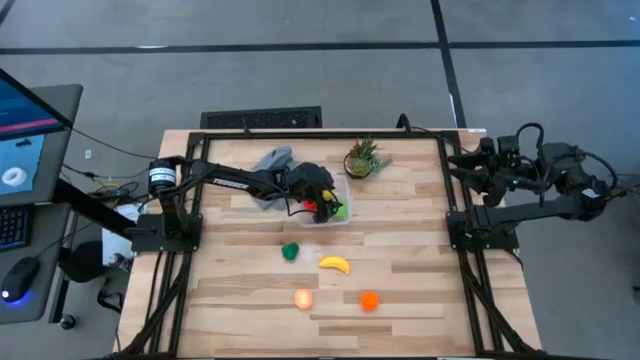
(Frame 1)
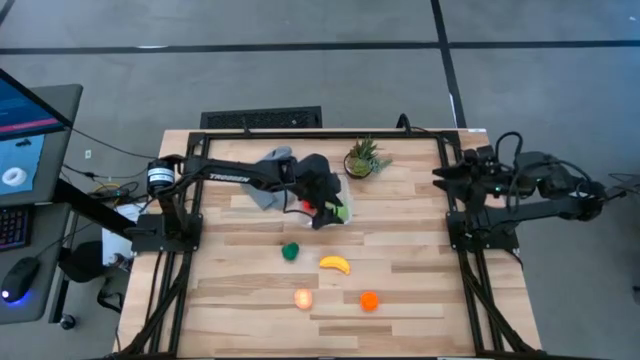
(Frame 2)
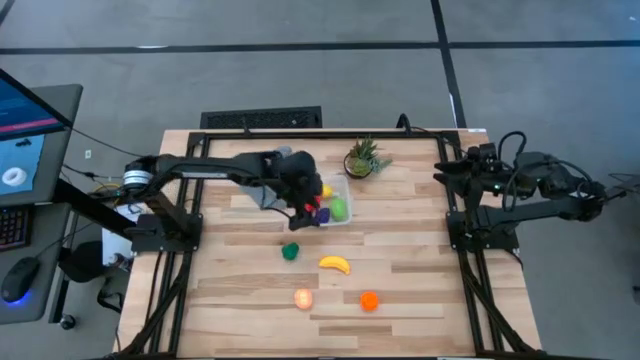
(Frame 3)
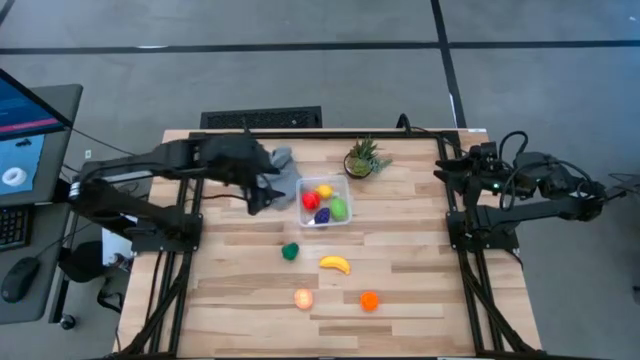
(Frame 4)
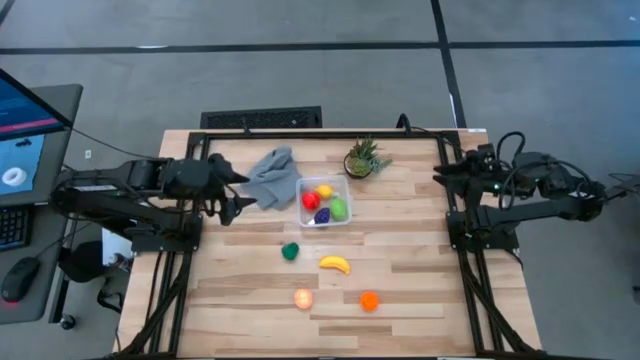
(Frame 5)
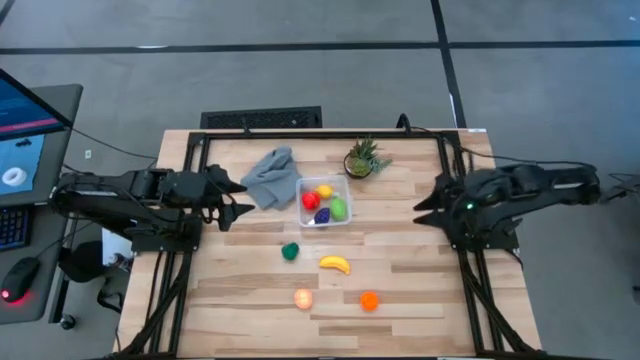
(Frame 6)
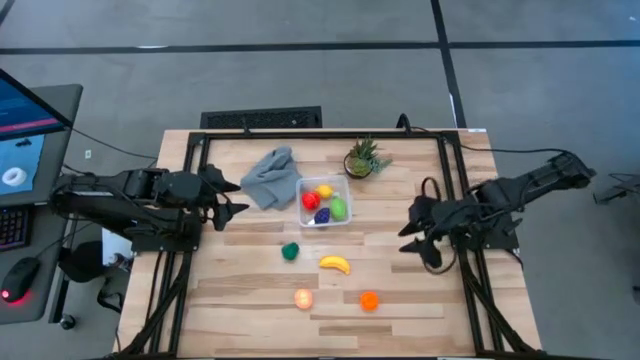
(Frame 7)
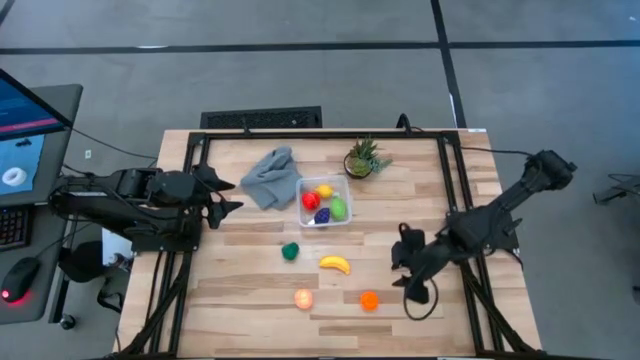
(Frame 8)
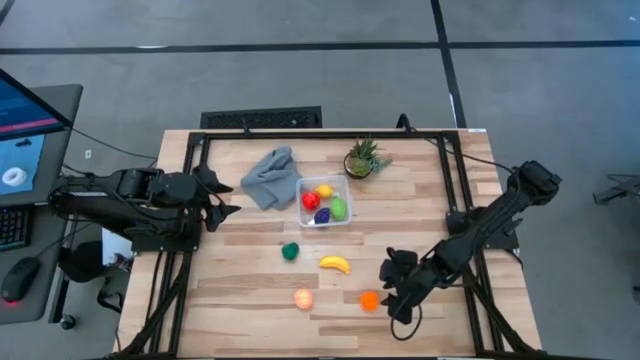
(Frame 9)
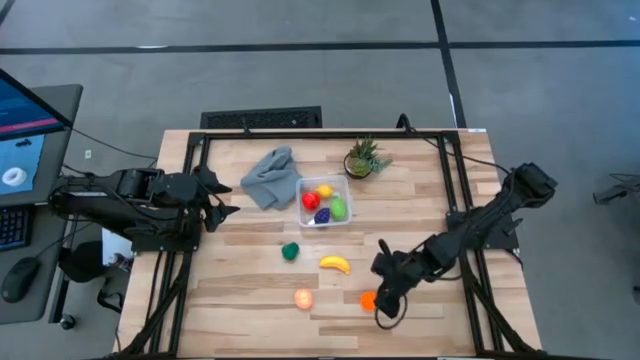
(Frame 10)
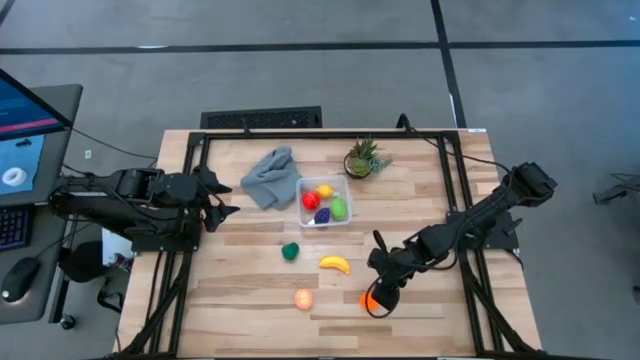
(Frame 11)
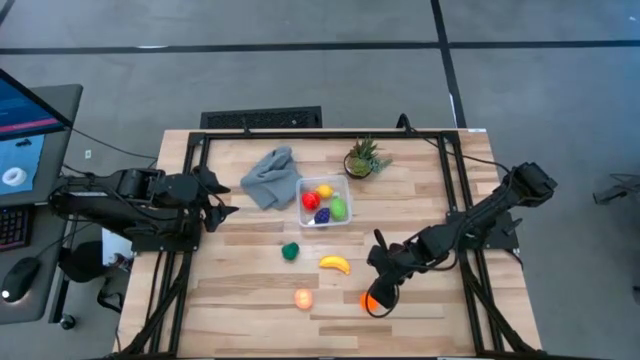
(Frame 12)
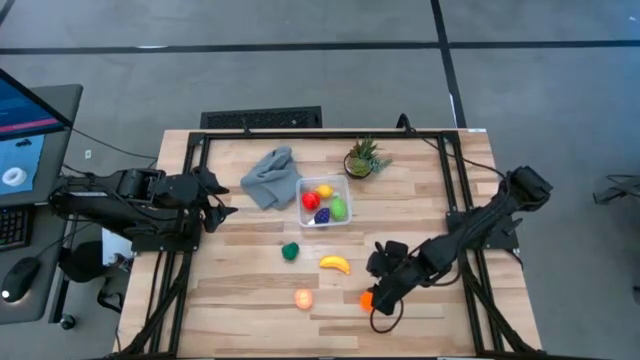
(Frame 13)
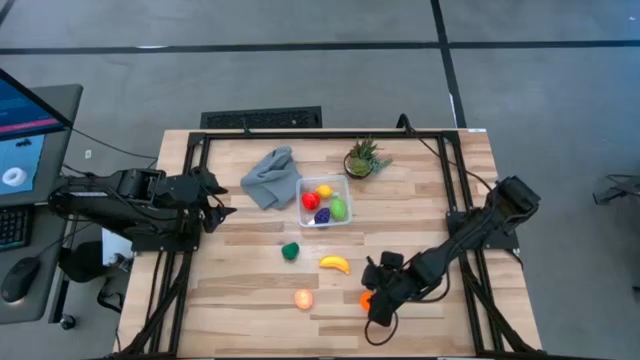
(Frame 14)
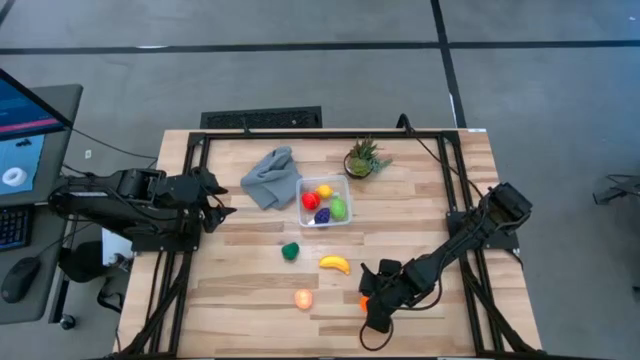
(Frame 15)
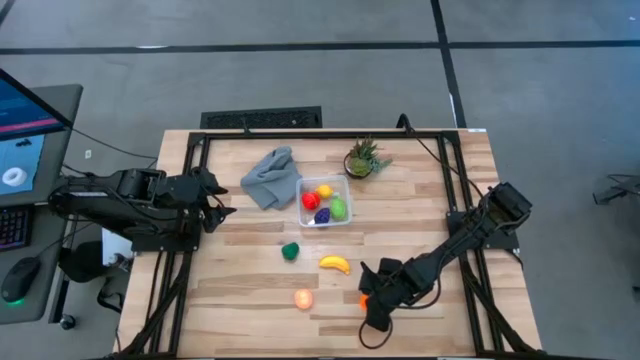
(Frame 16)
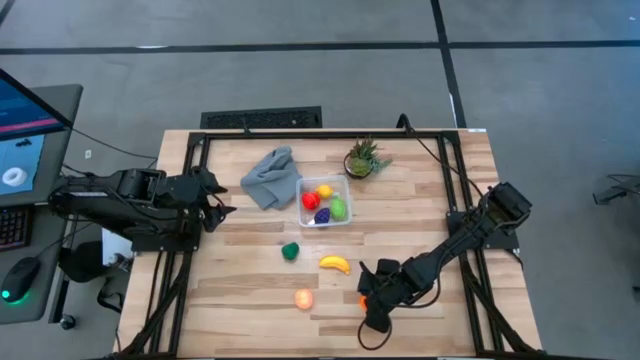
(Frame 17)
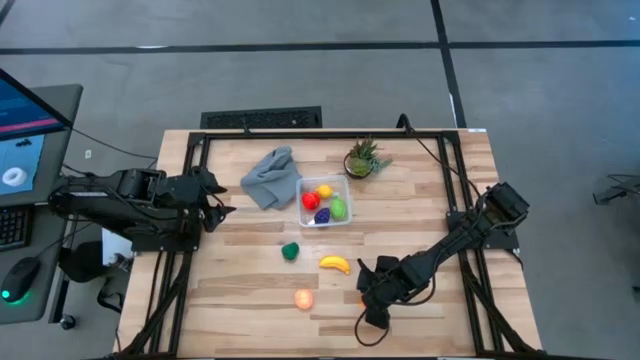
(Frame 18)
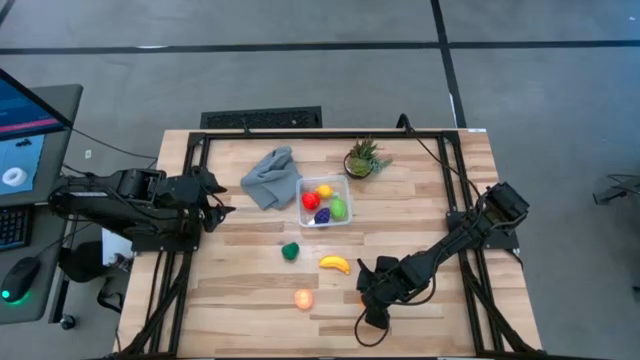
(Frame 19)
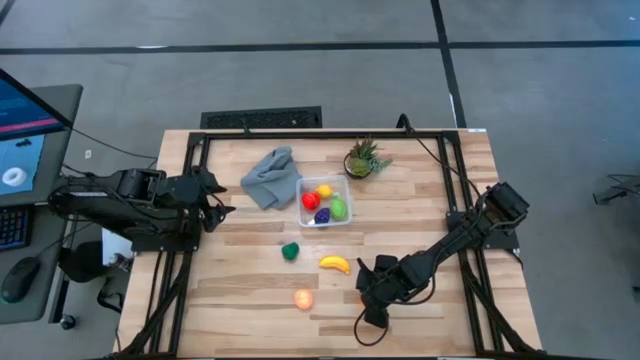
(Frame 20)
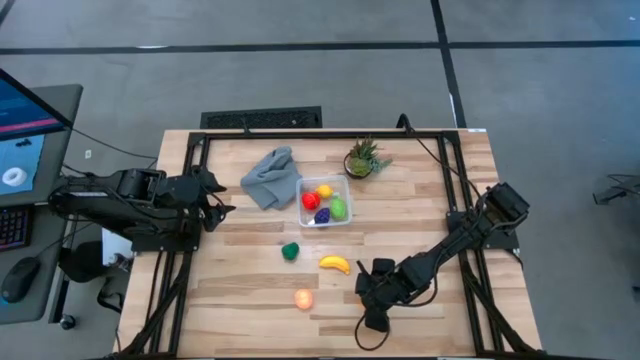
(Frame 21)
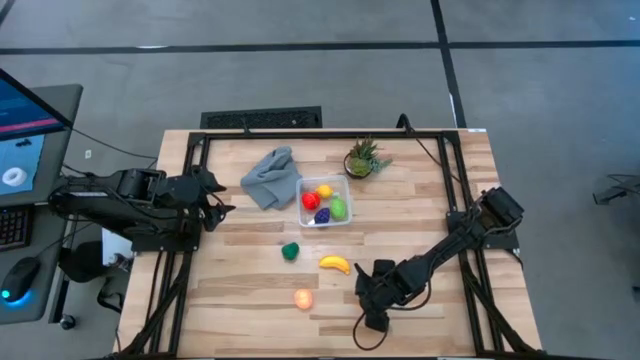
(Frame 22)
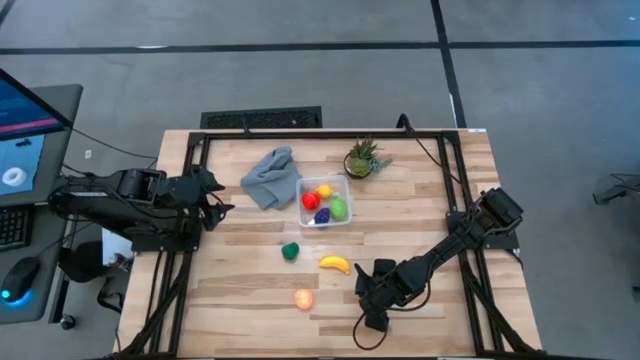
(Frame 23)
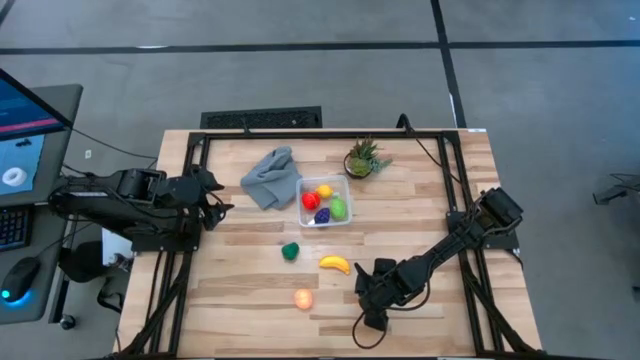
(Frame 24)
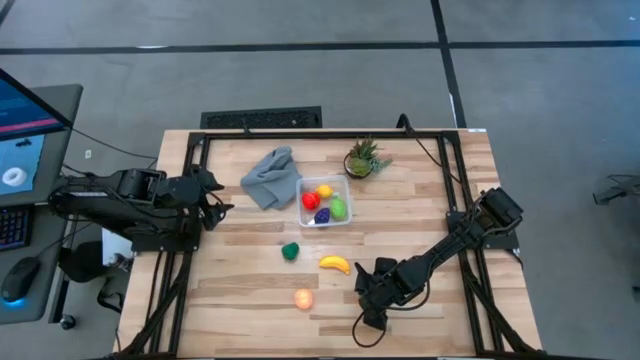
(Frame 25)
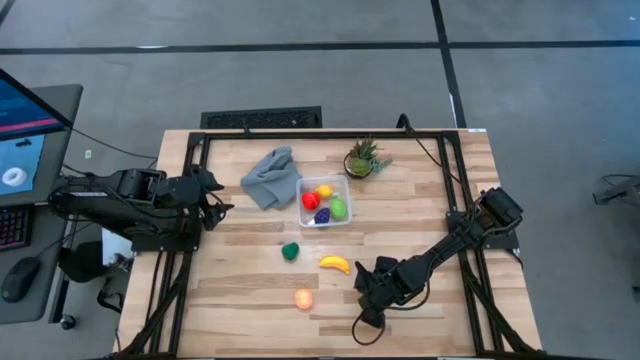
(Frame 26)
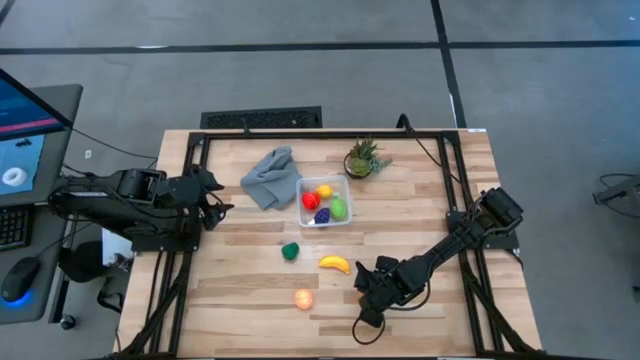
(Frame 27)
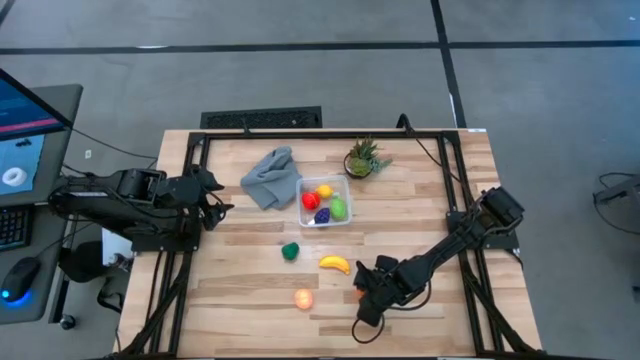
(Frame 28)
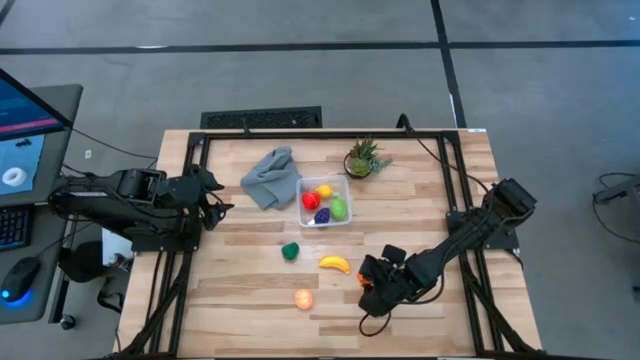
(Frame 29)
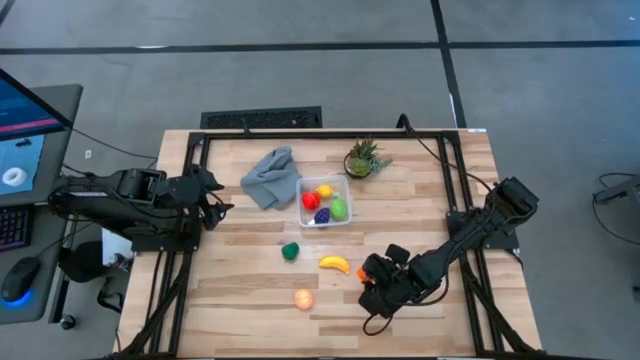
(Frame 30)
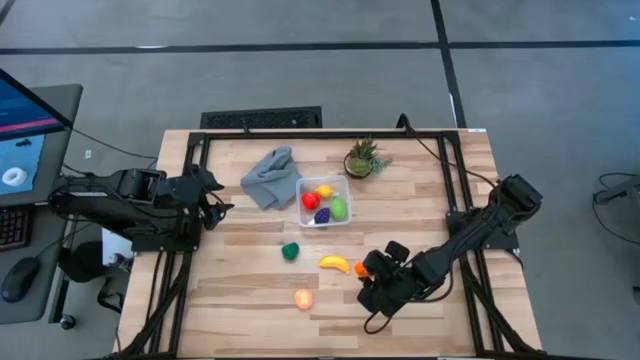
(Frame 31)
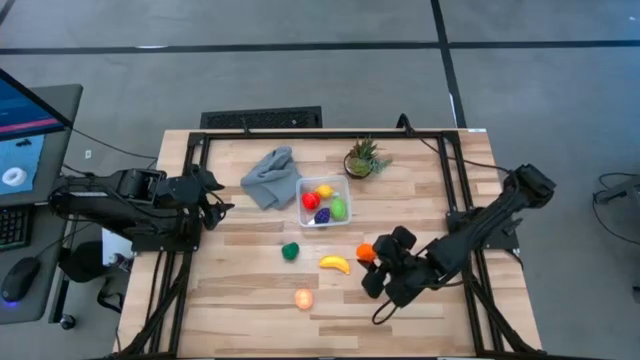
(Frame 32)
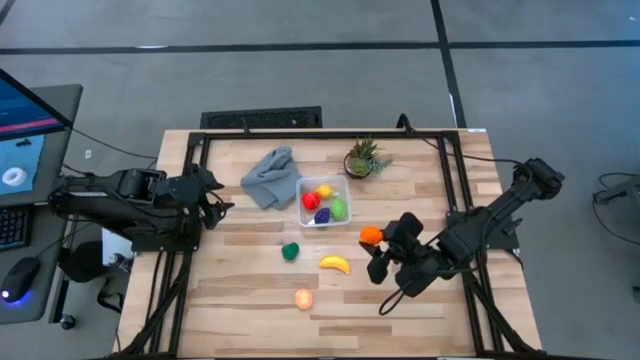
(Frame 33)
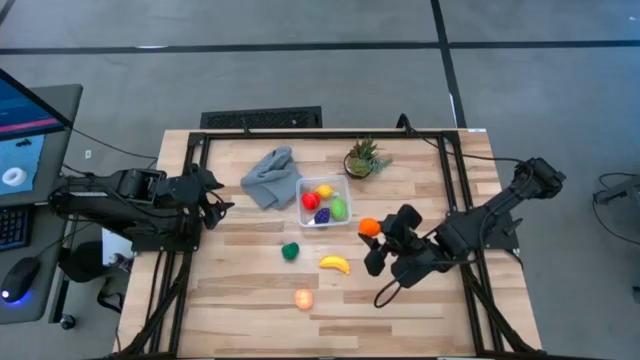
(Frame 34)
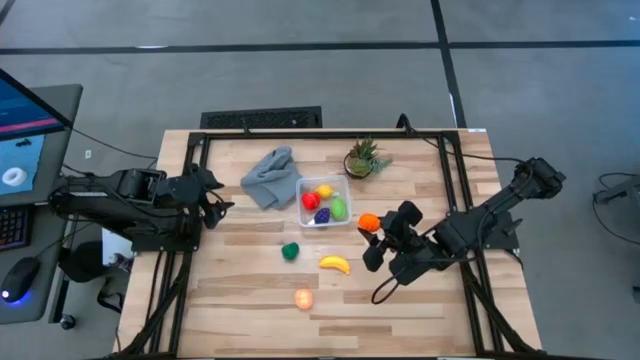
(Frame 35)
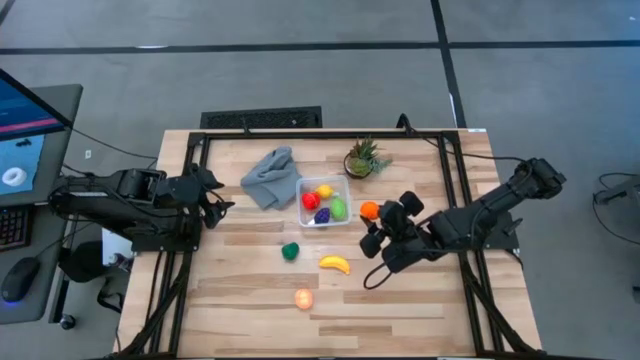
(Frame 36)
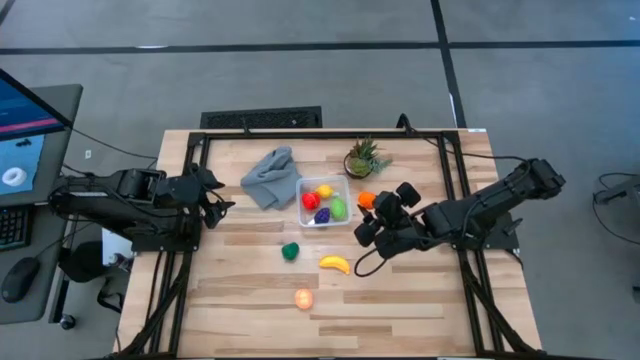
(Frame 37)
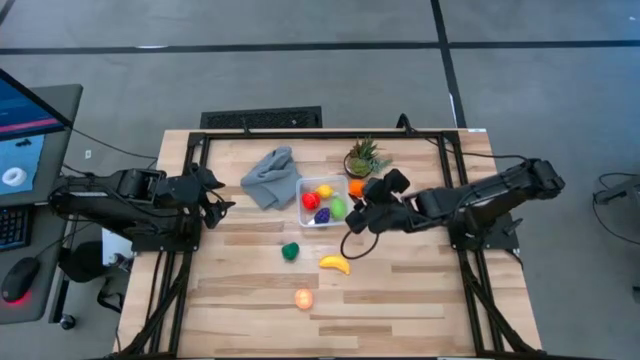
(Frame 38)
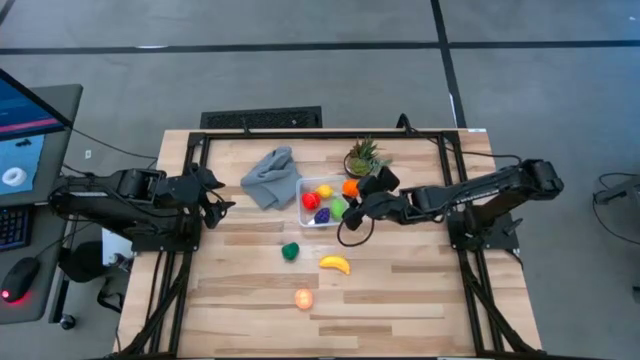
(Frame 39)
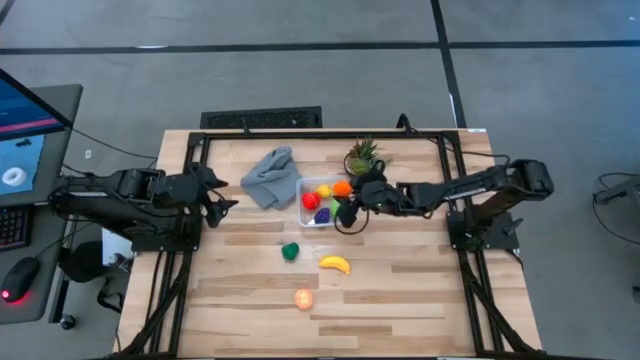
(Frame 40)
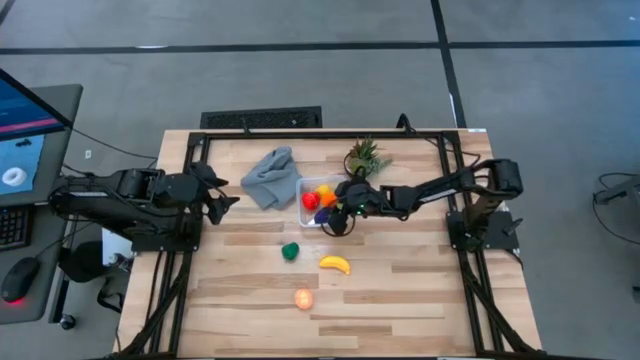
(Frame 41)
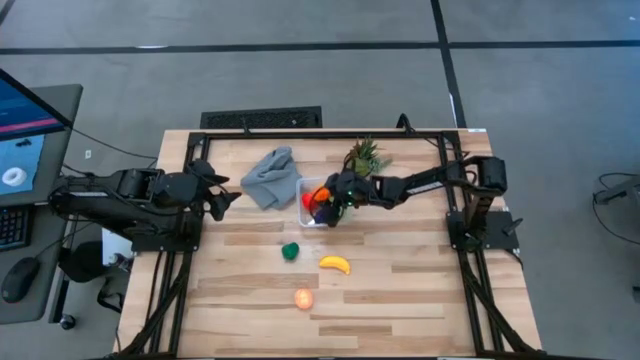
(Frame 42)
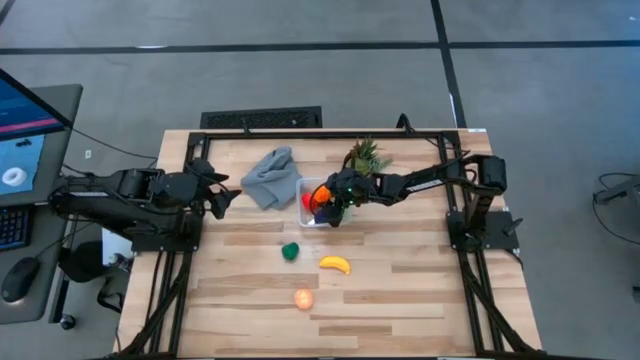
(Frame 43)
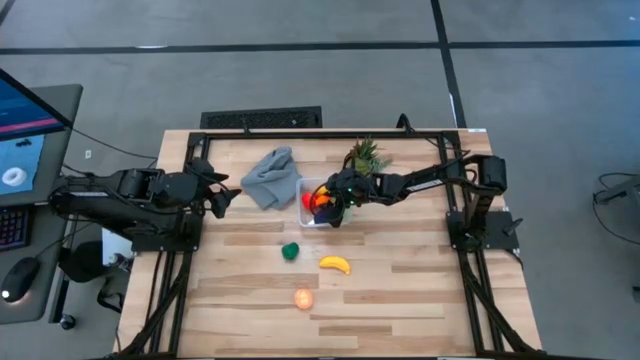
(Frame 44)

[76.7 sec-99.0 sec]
Task: Pick and placing Produce into tupperware
Put the orange bell pepper into the transparent bin
